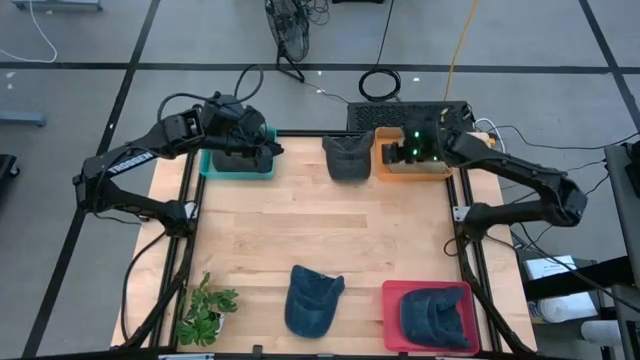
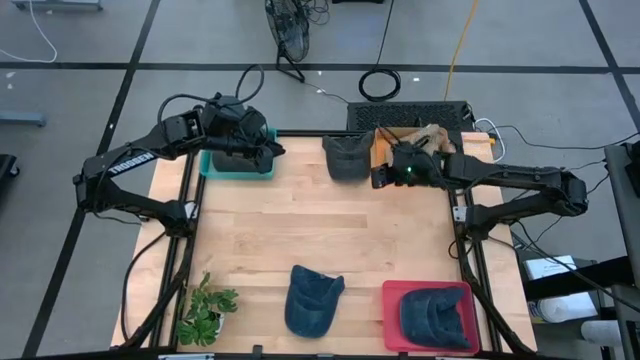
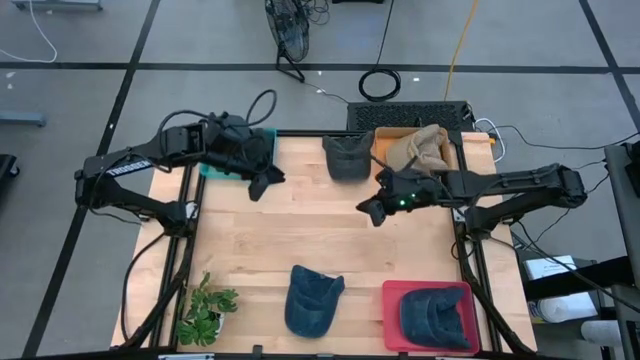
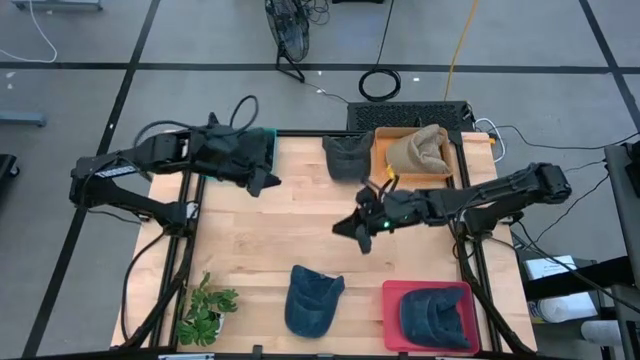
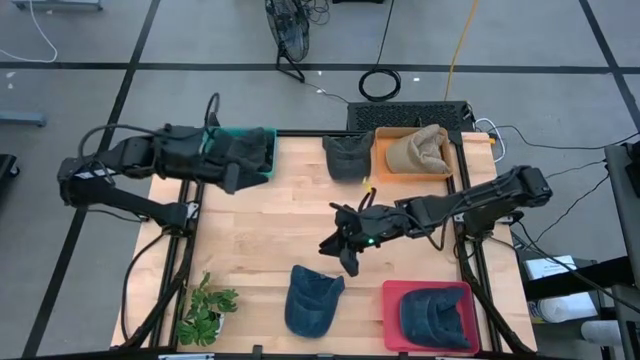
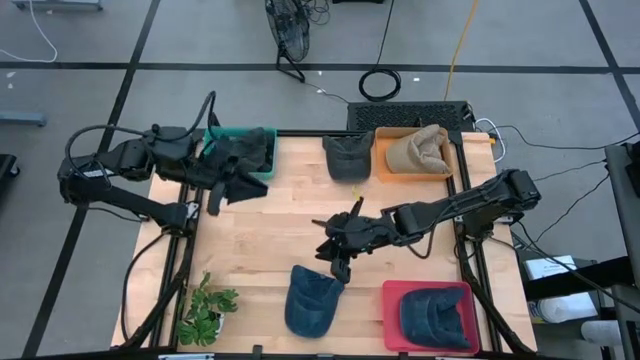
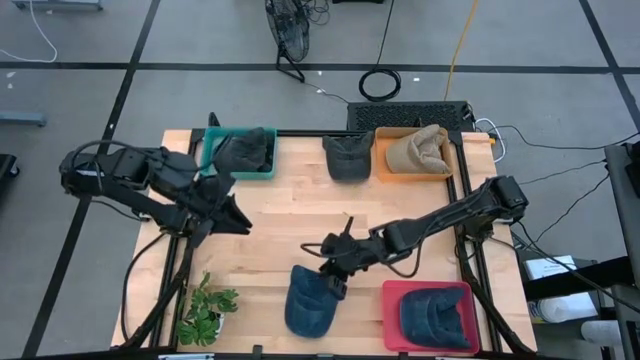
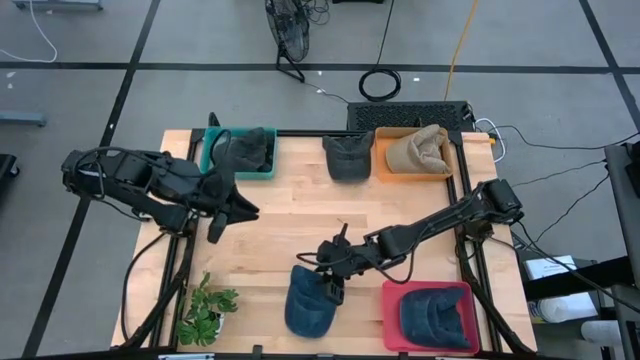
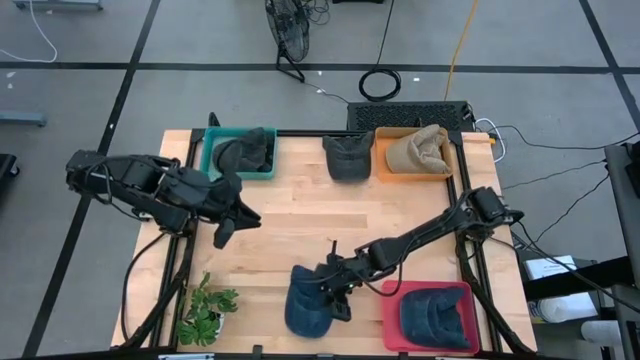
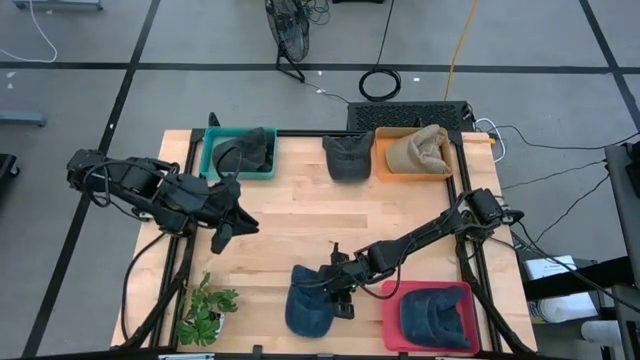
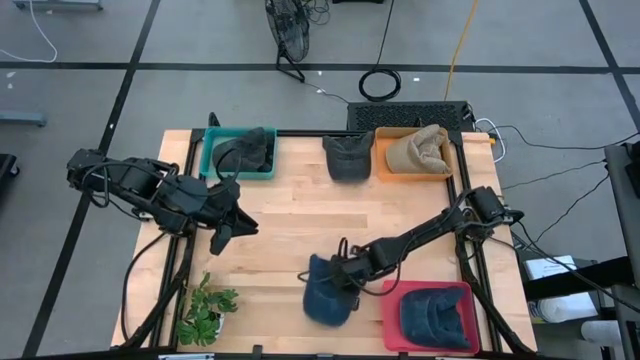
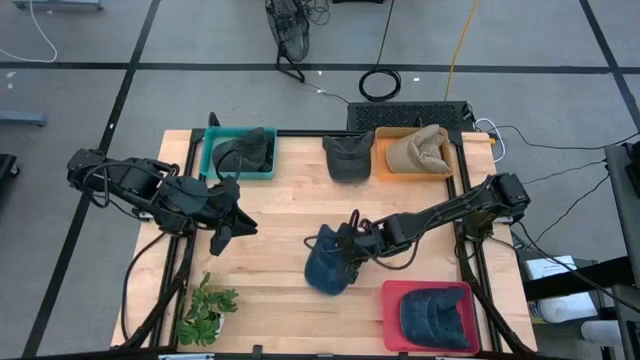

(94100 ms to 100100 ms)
Task: Pick & Place hat
Put the blue cap into the red bin

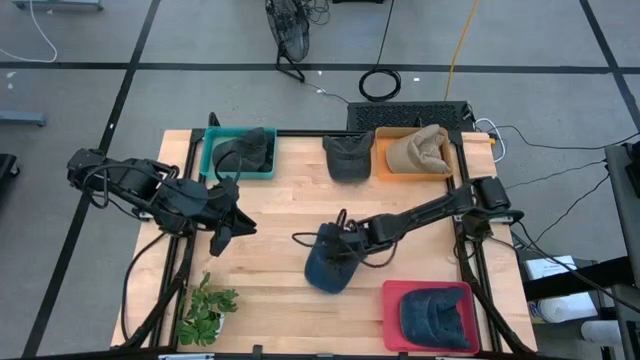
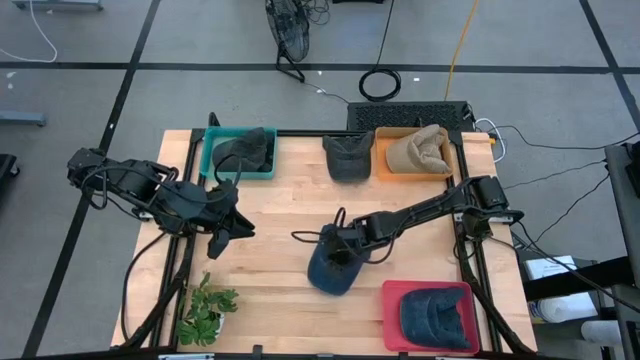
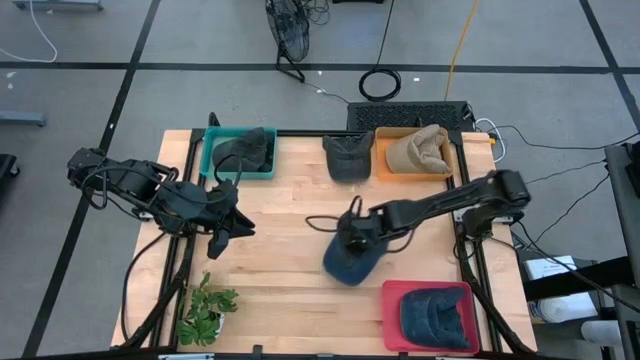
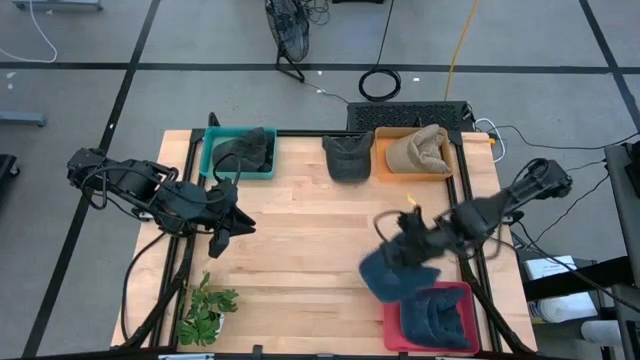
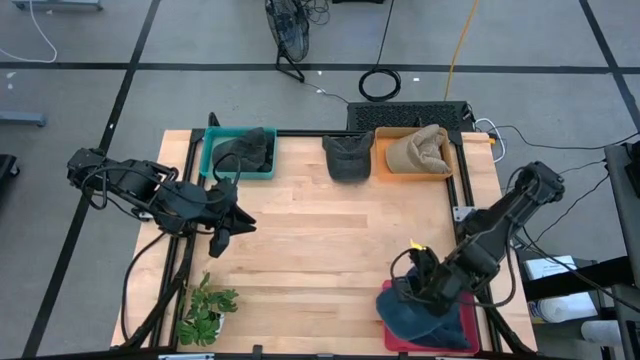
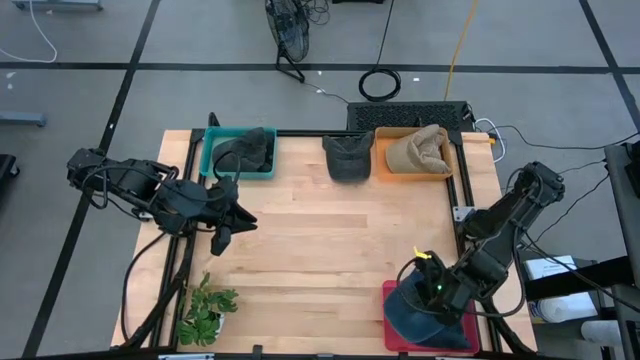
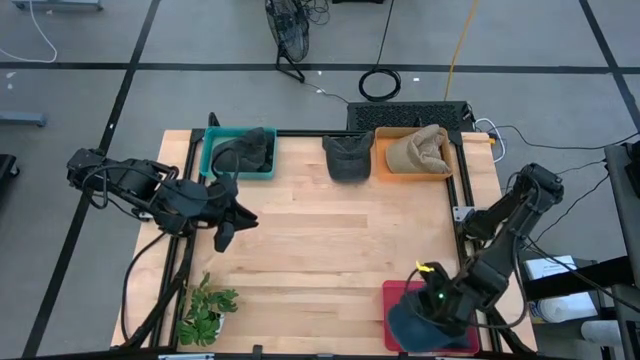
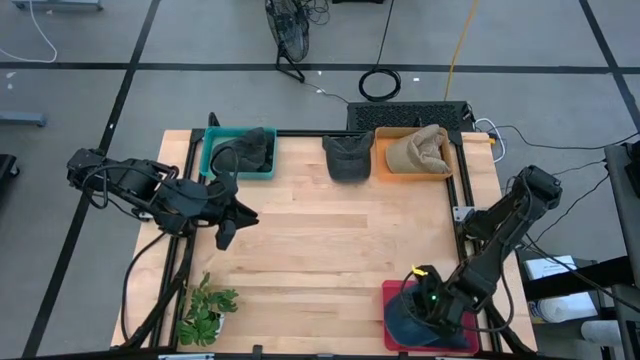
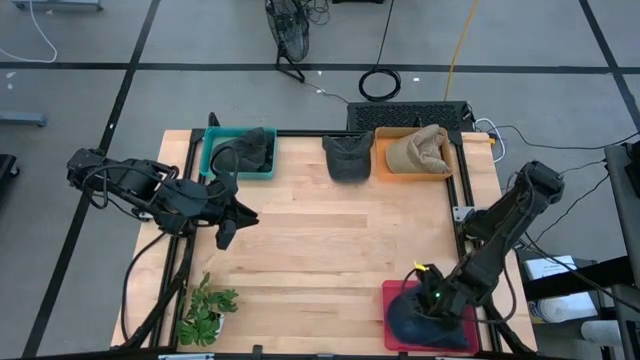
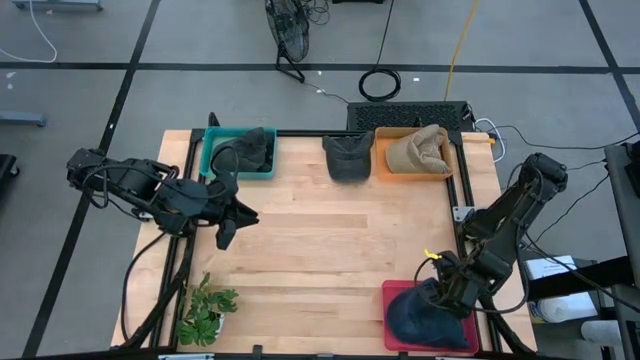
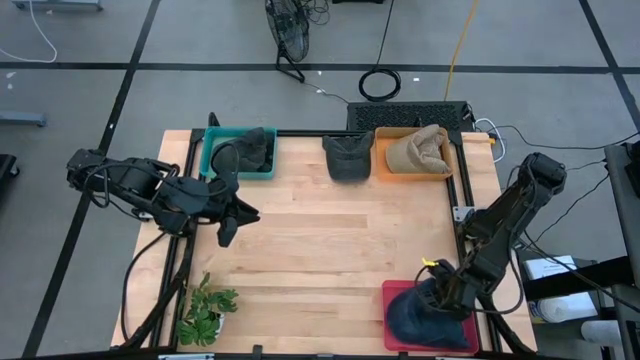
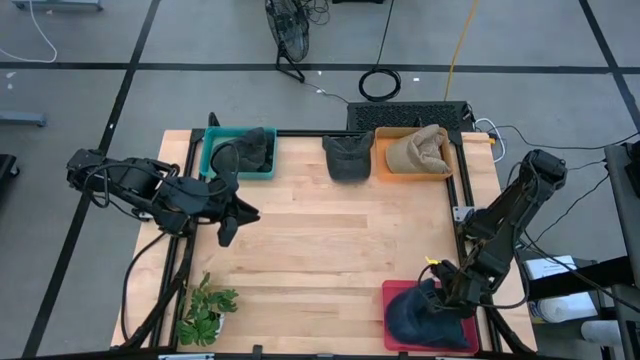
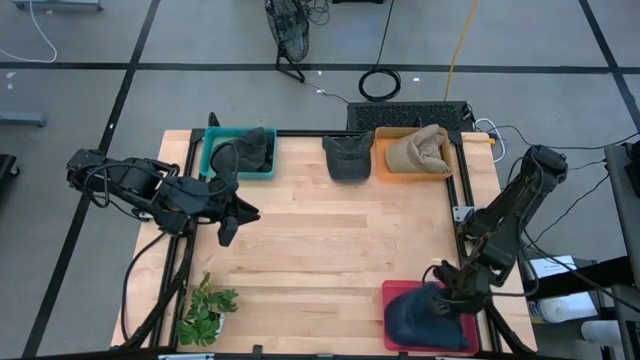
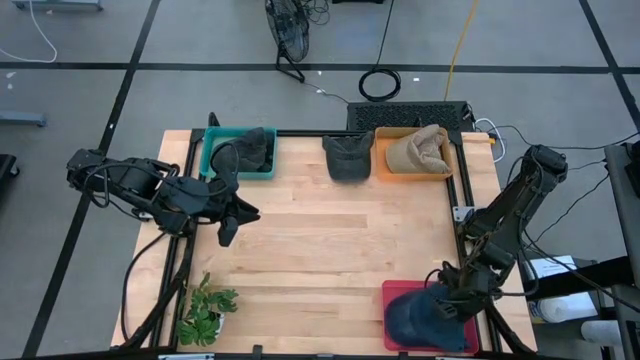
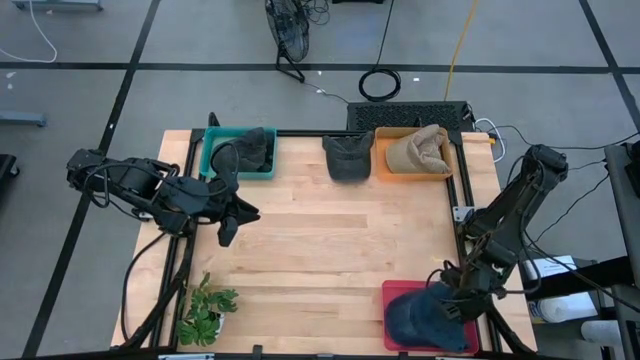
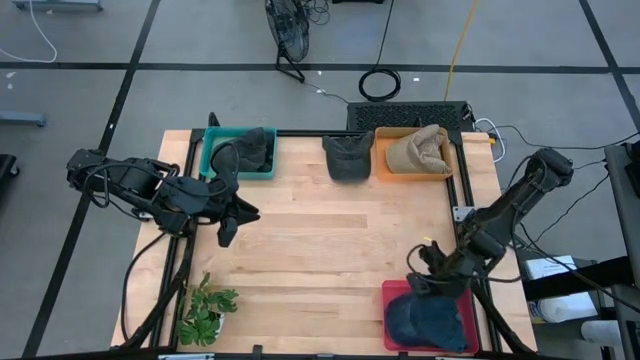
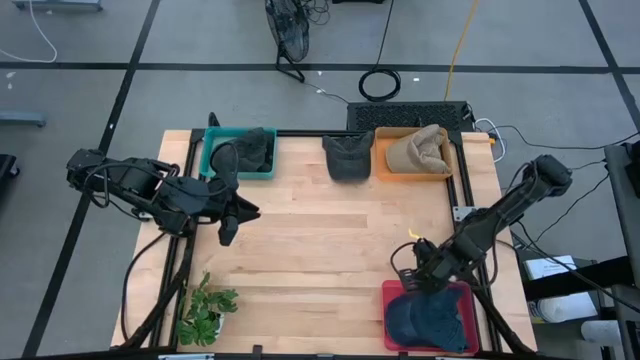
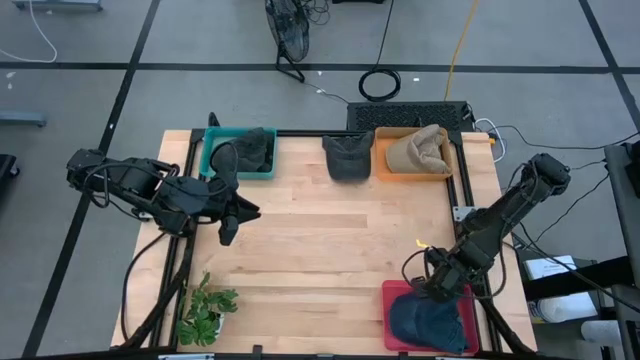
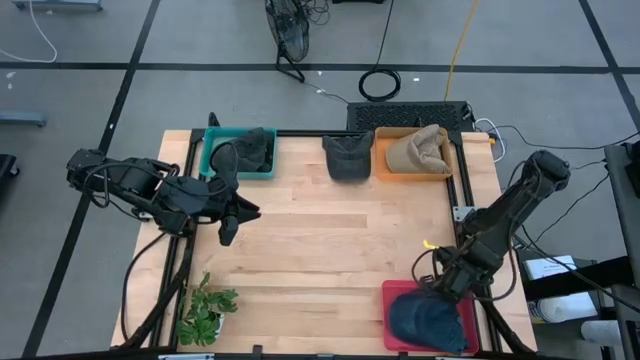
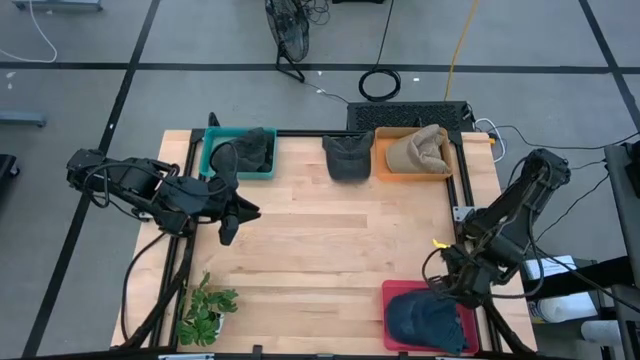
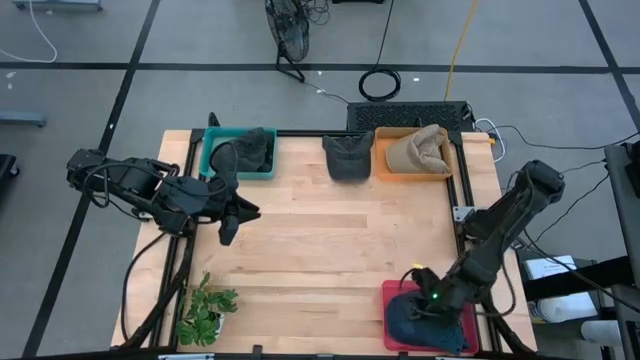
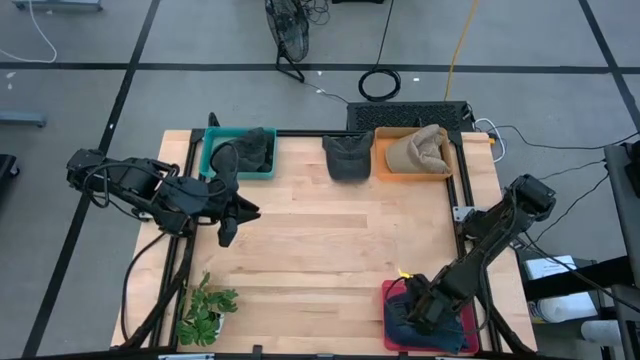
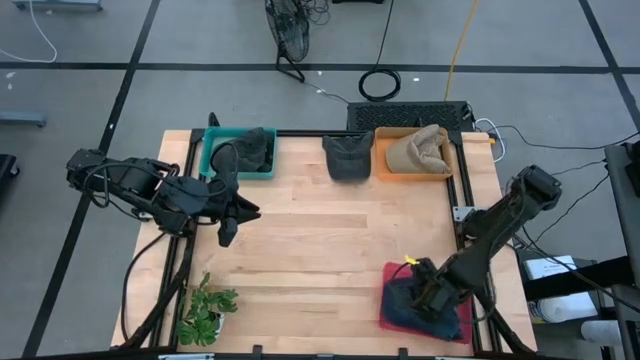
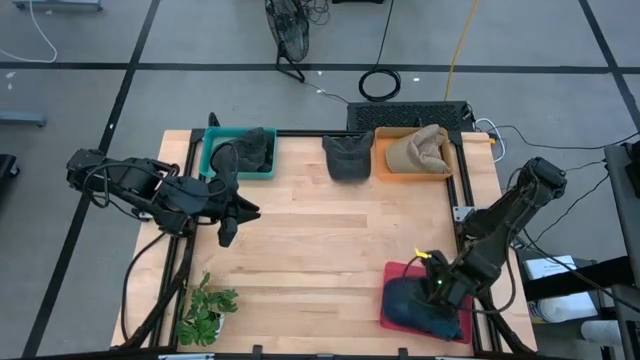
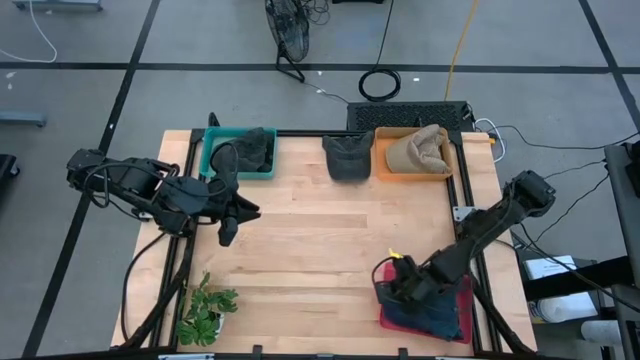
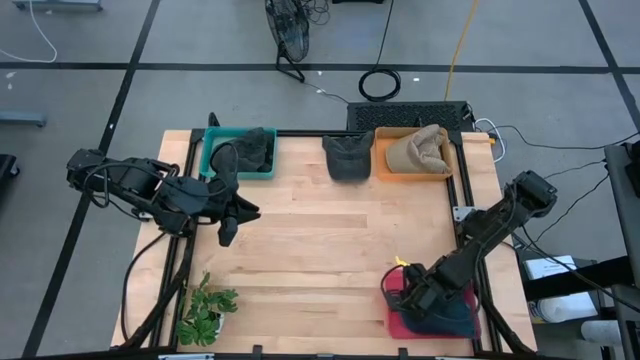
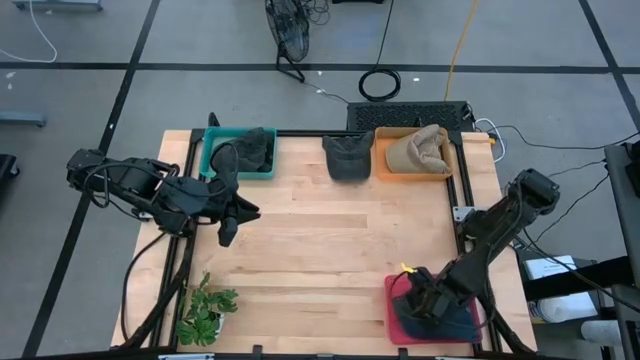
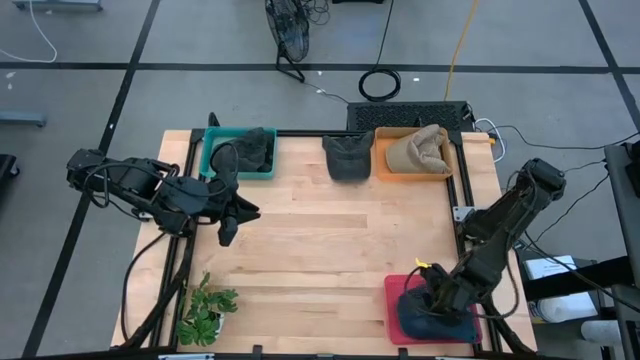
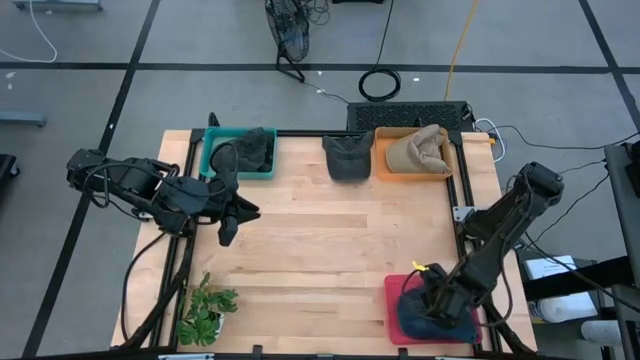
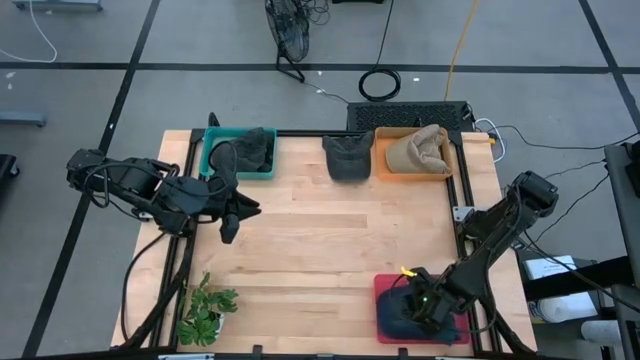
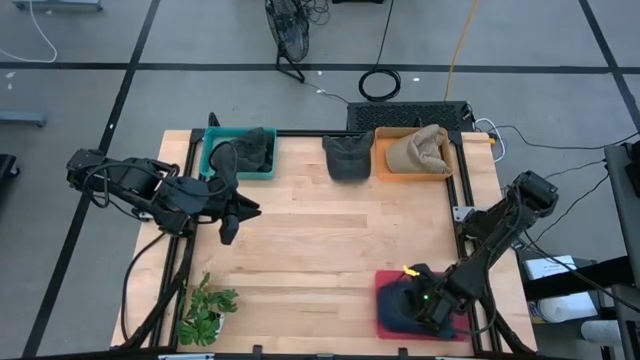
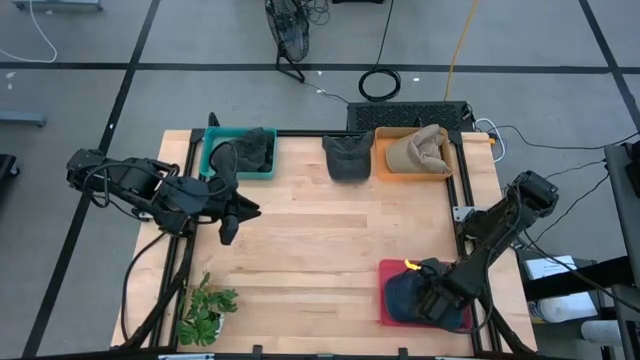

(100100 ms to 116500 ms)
Put the blue cap into the red bin
